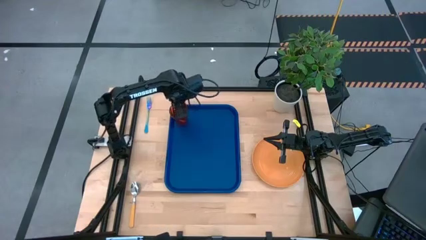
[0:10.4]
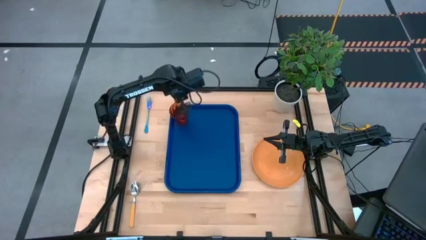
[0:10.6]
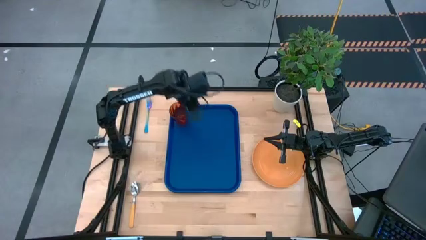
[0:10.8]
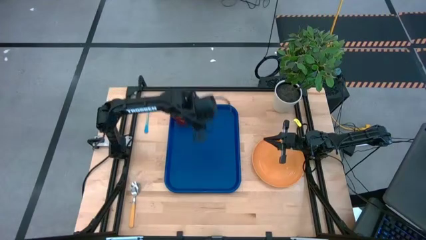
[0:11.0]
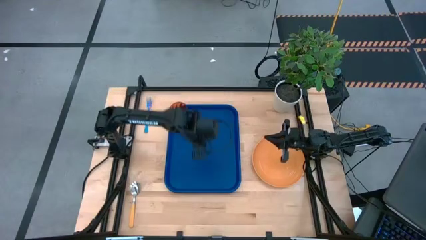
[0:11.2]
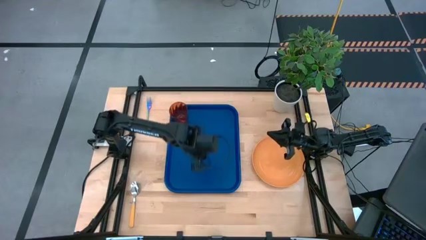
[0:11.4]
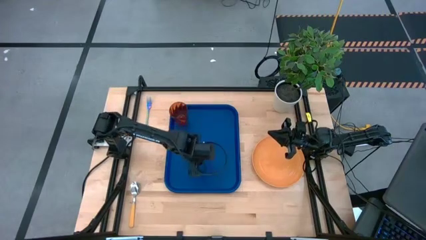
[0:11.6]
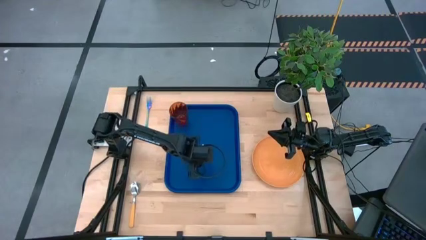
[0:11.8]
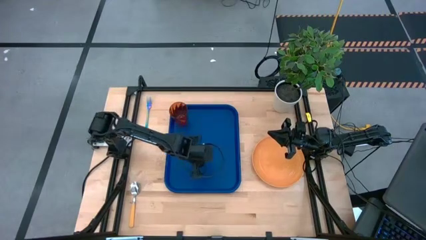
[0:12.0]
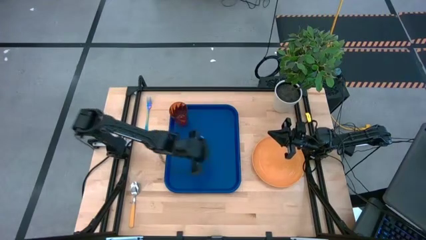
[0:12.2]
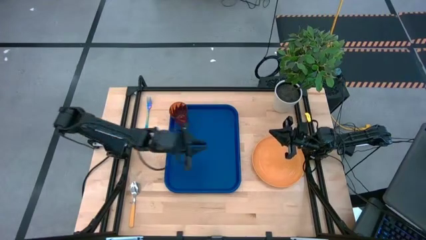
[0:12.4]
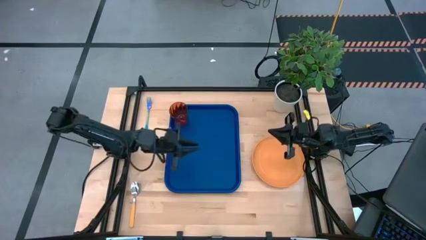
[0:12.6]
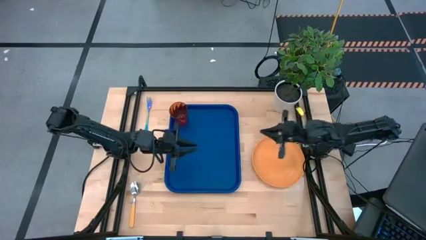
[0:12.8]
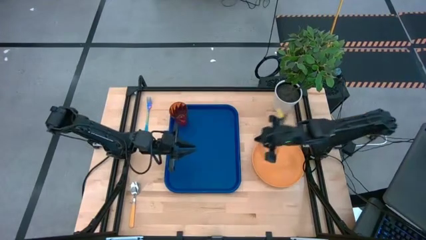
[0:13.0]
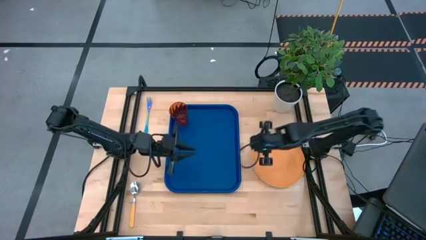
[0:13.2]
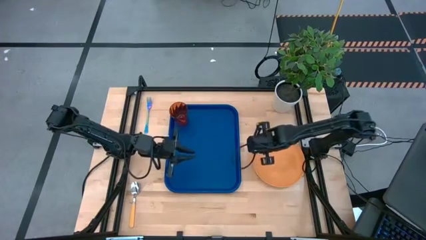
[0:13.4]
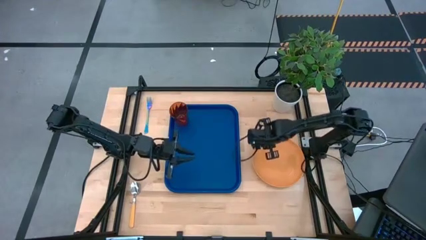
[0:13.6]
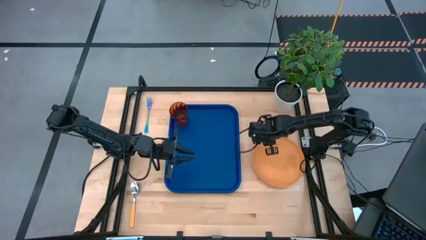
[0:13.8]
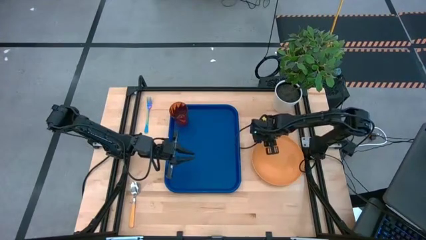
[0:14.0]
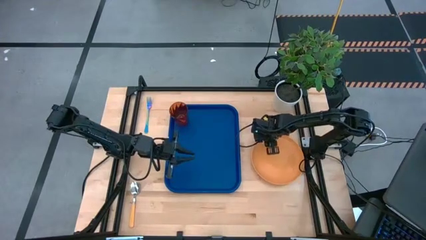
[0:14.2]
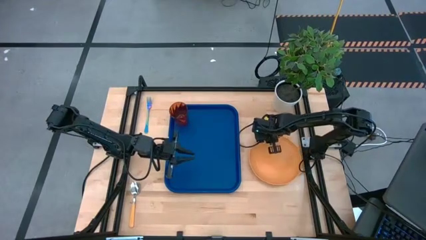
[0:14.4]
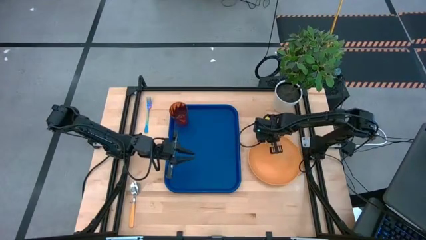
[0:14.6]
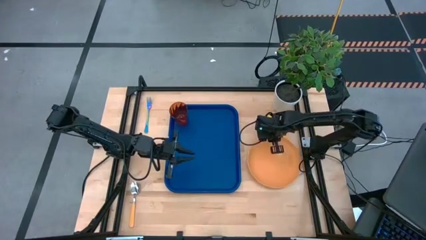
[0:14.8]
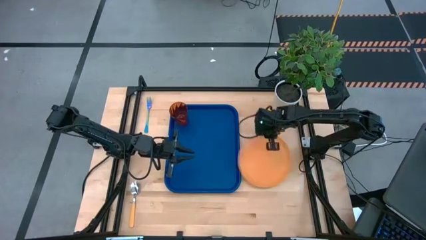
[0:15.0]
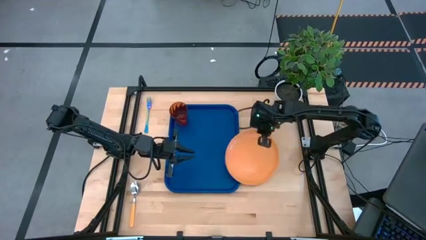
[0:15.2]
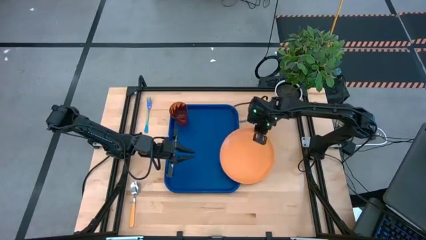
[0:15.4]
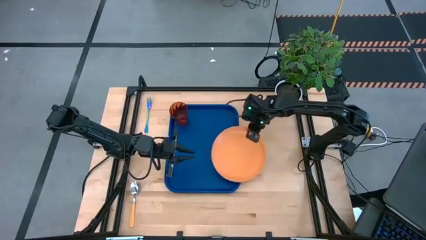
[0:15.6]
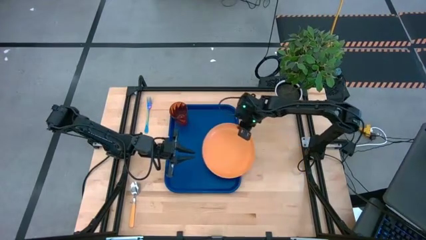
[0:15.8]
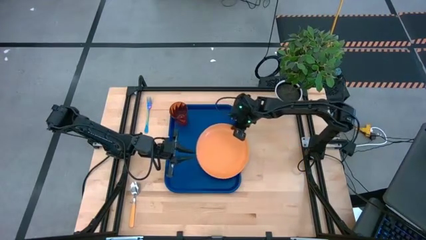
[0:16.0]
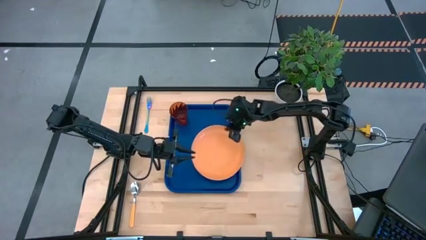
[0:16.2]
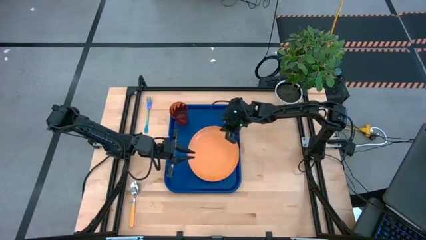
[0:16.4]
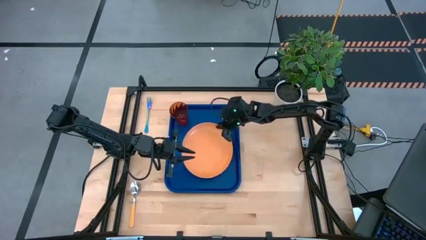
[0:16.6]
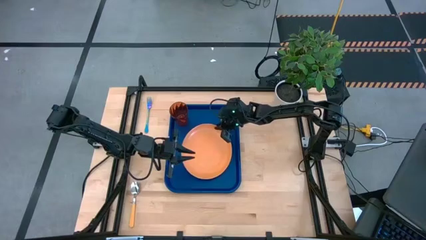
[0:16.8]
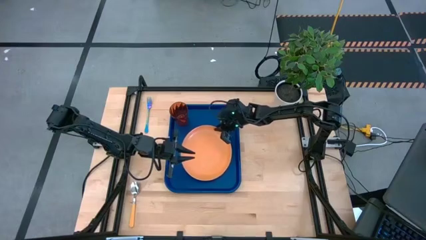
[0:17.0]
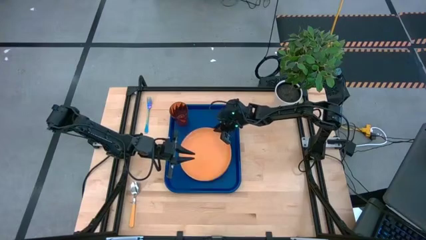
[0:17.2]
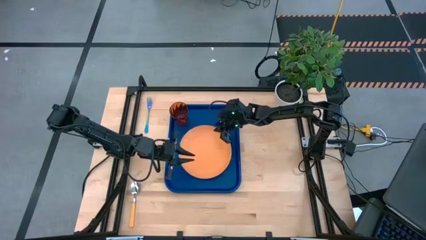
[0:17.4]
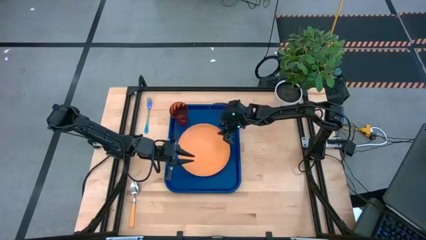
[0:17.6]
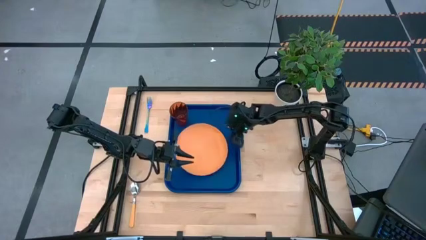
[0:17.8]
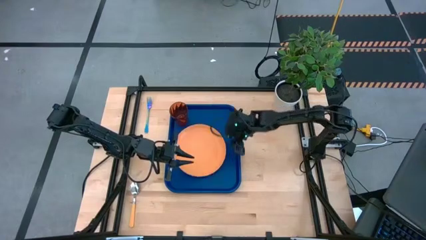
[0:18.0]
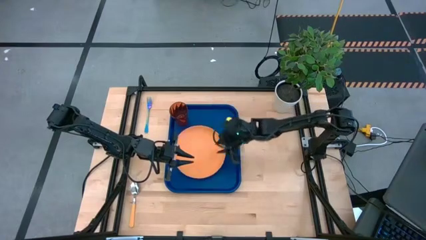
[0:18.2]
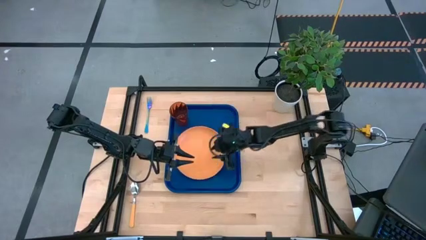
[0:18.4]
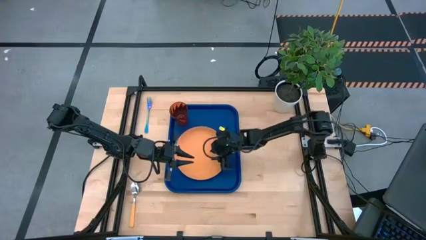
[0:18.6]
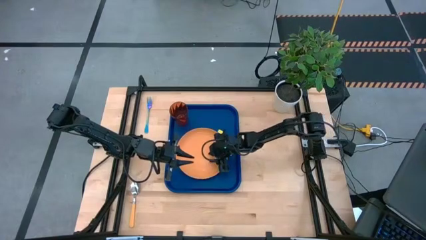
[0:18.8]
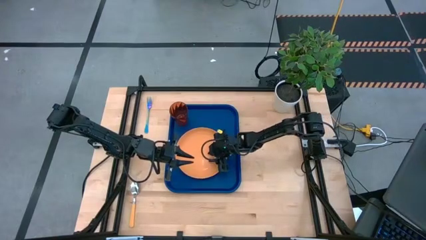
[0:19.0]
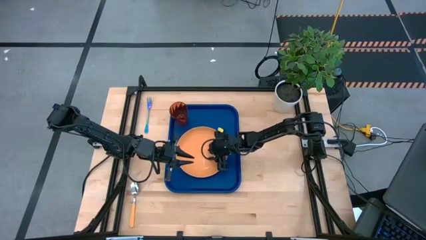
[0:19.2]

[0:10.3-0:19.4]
Task: Pick and place plate/cup/fork/spoon on tray
Put the orange plate to the left of the brown glass on the blue tray

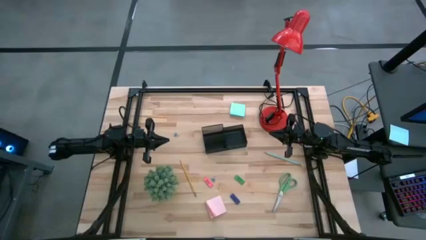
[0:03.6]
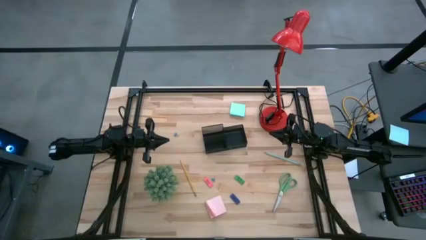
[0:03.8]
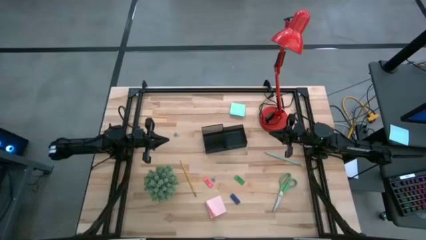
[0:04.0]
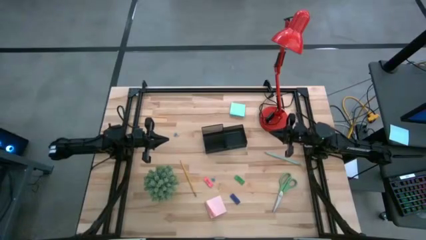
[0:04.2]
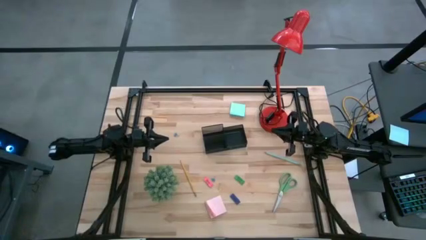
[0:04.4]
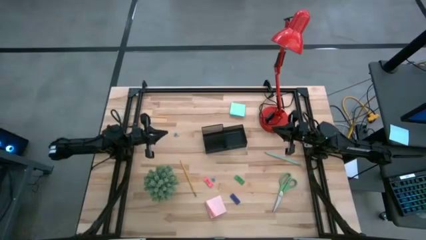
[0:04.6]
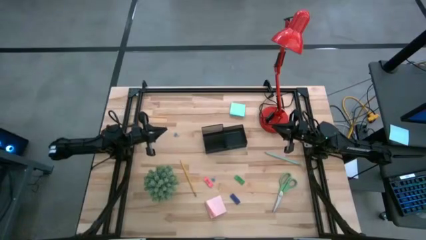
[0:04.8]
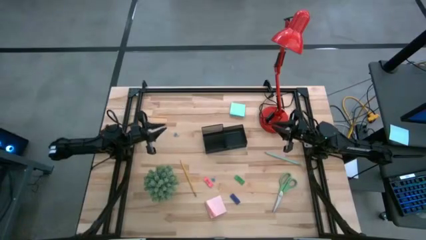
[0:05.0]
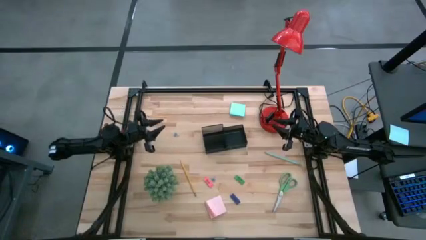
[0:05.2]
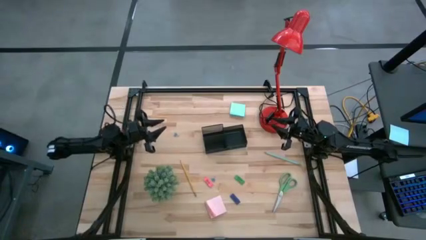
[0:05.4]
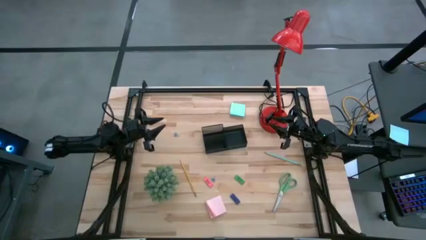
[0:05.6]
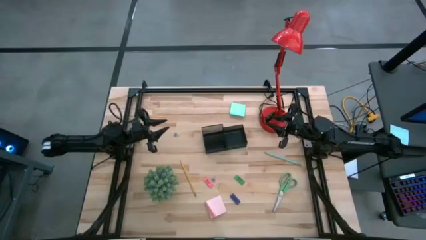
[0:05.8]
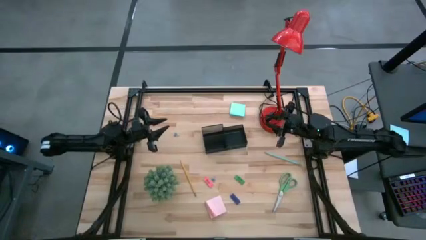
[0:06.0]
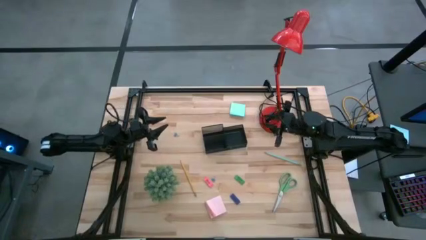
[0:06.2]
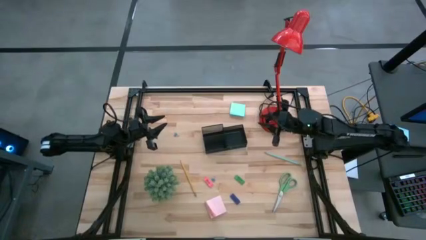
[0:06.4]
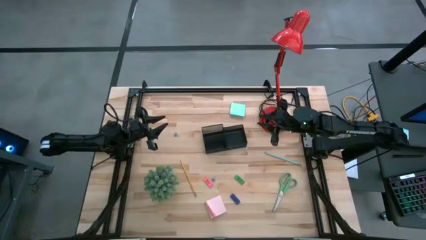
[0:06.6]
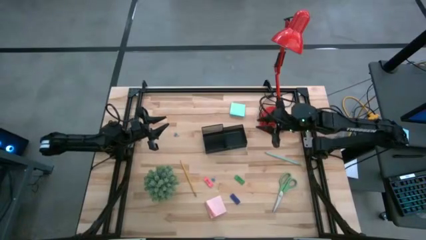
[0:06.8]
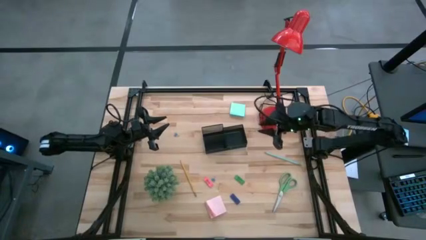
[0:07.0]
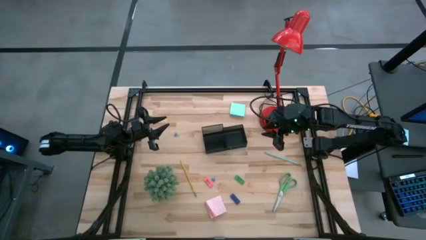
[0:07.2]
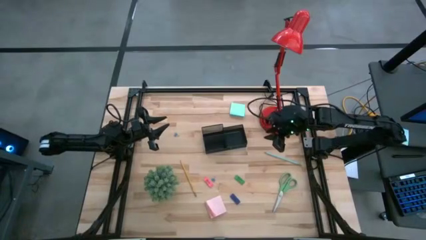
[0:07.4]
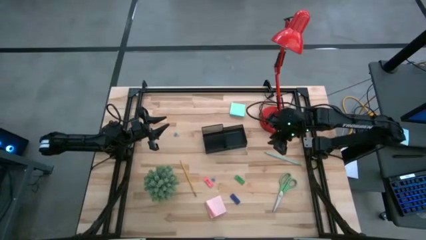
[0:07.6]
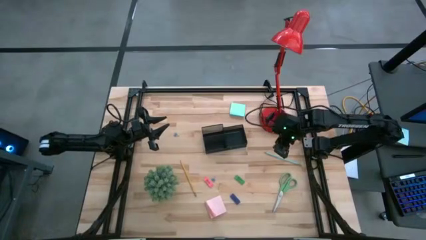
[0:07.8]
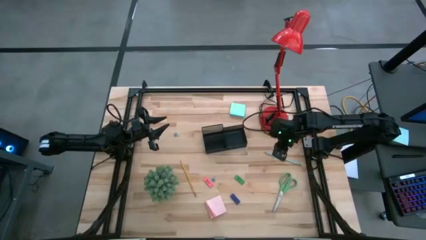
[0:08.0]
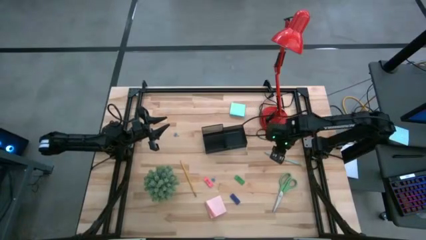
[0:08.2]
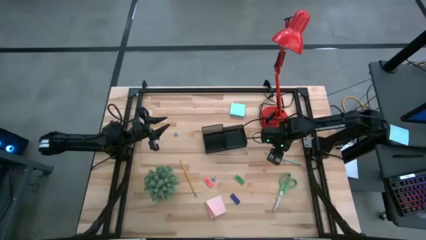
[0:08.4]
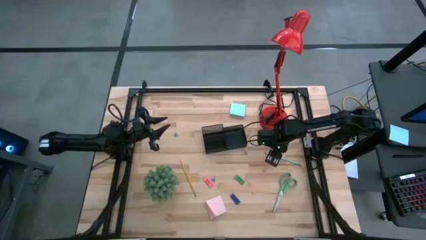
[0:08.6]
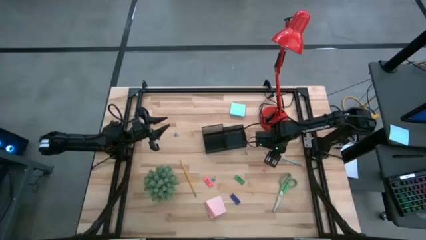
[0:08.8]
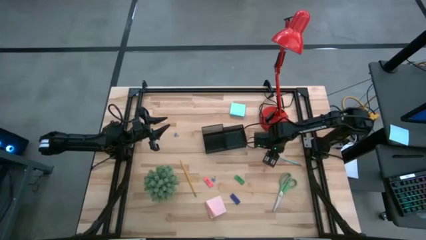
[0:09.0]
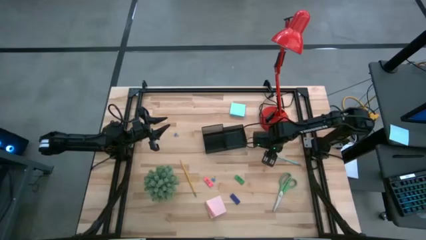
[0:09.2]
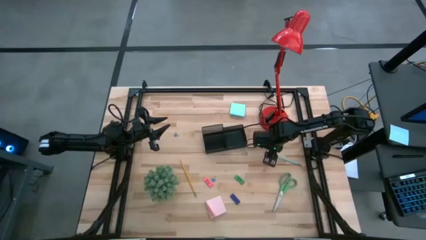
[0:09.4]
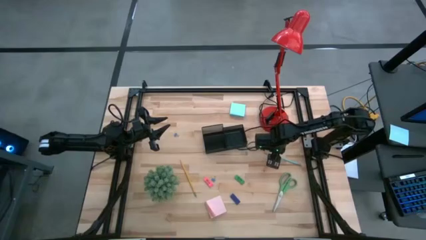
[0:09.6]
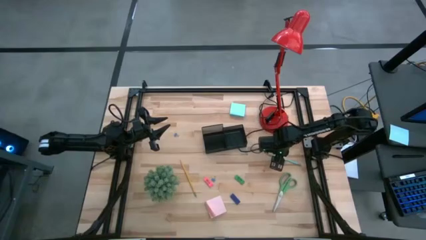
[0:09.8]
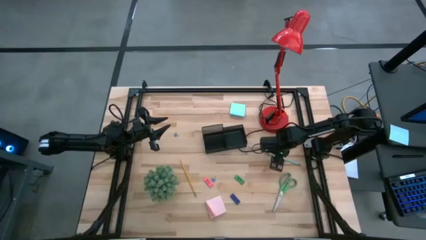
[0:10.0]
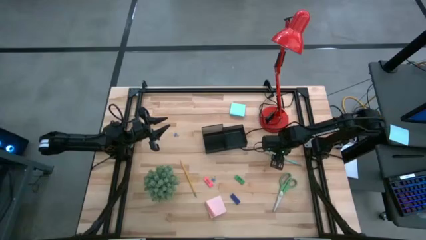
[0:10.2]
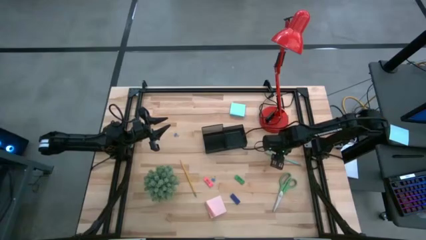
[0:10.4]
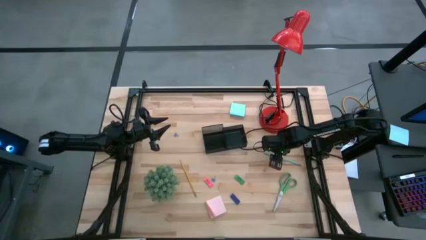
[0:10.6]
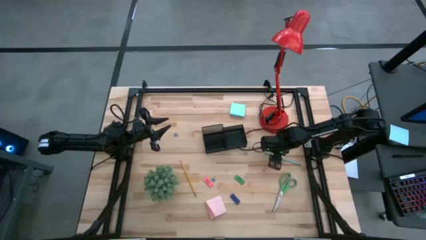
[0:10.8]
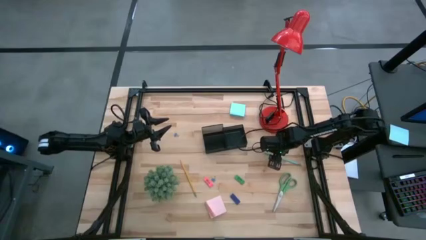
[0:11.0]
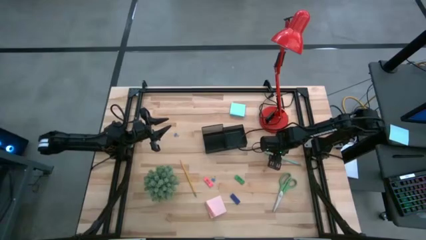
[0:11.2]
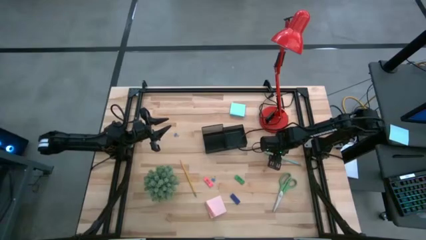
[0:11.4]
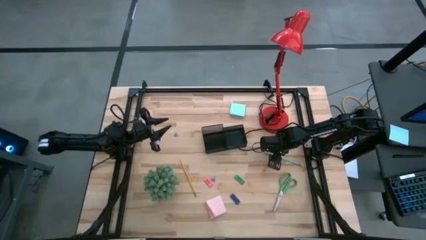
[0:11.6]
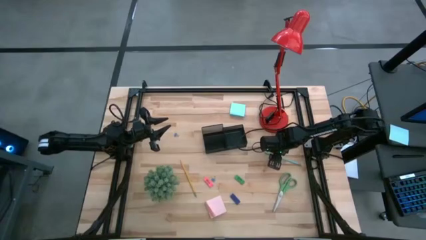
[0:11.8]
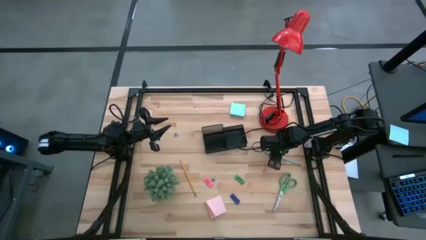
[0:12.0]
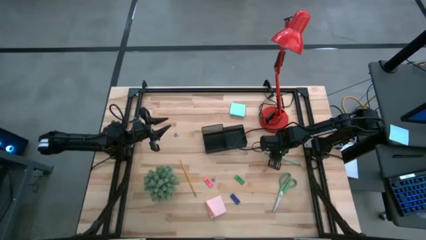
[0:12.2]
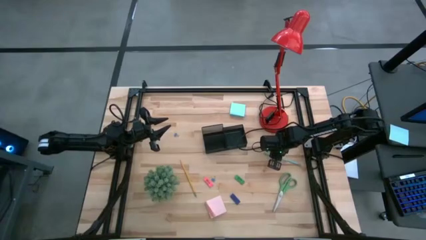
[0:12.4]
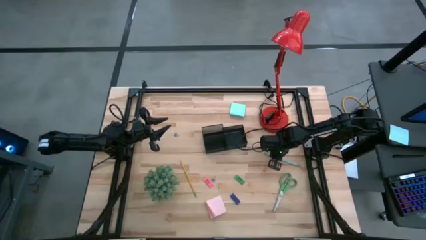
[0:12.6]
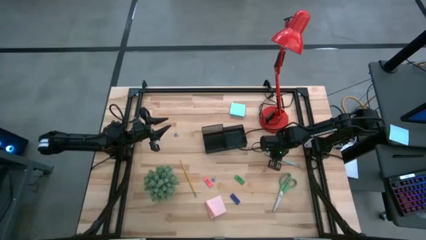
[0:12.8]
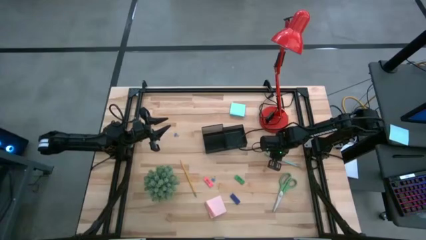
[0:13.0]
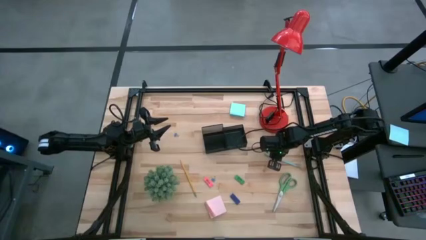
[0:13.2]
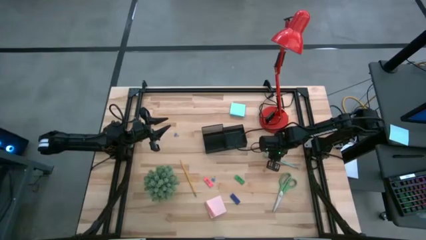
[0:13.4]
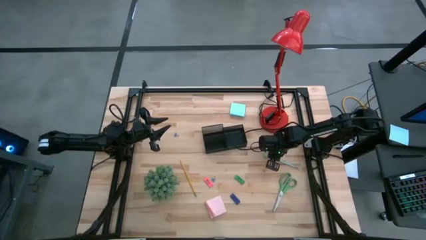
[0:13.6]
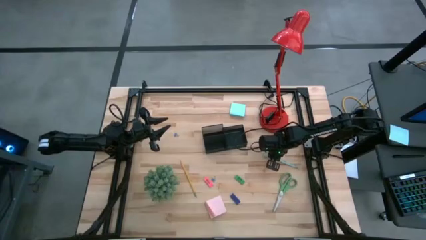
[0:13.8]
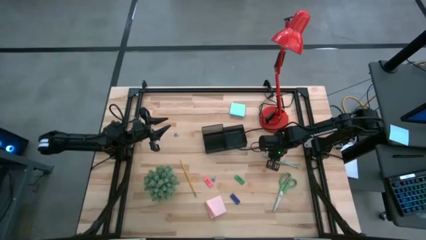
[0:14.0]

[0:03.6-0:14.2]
Task: Pick and place office supplies into organizer
Put the blue pencil into the black desk organizer
